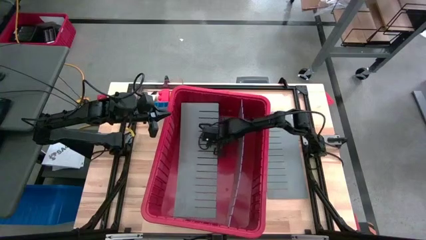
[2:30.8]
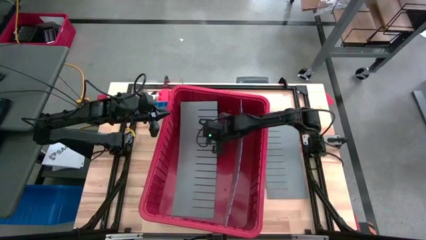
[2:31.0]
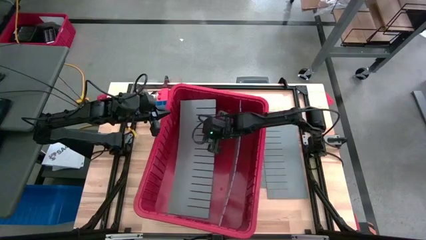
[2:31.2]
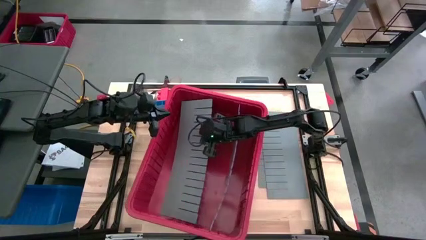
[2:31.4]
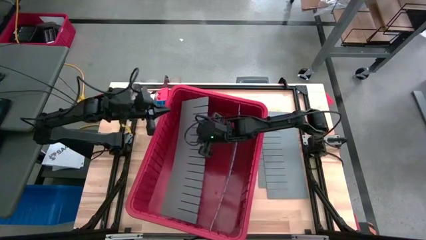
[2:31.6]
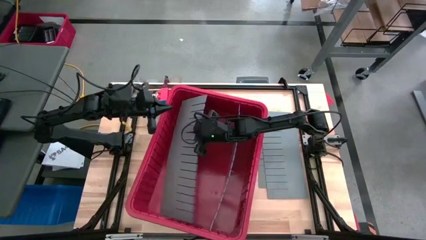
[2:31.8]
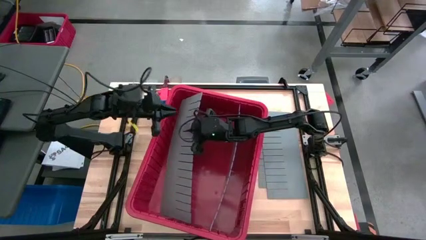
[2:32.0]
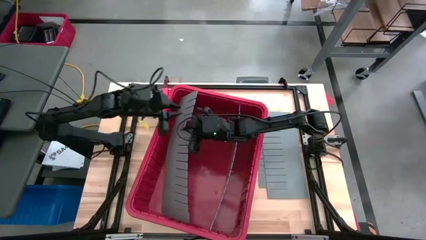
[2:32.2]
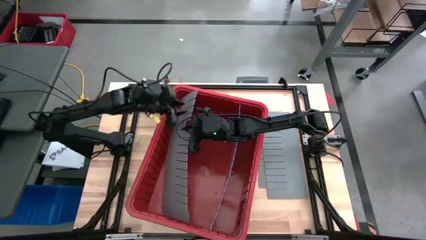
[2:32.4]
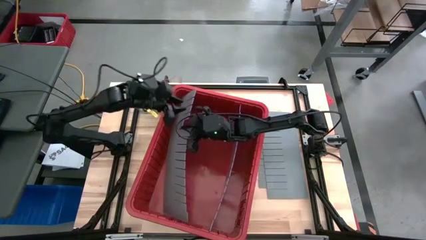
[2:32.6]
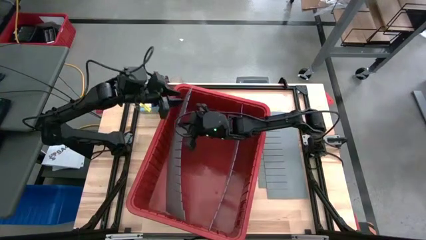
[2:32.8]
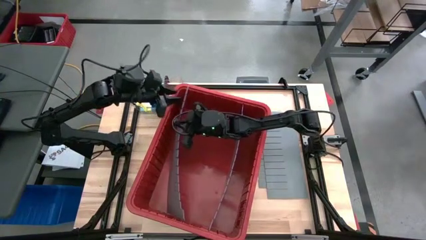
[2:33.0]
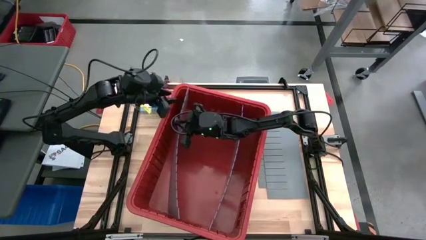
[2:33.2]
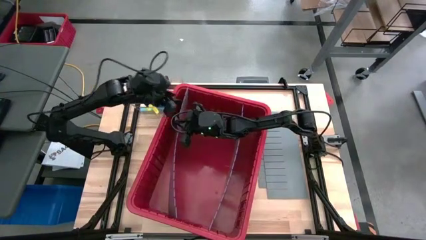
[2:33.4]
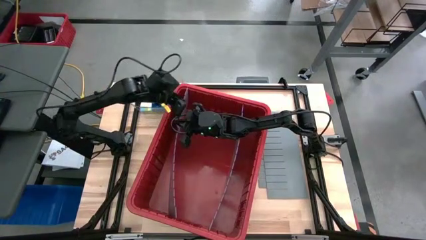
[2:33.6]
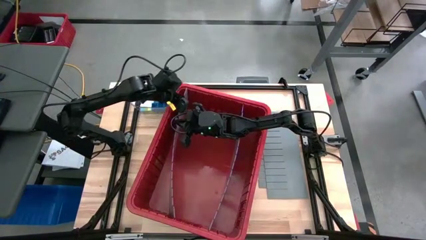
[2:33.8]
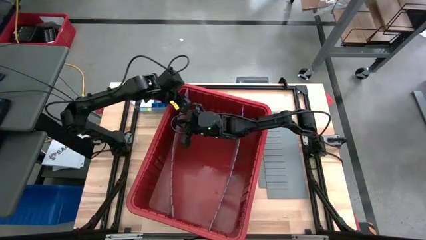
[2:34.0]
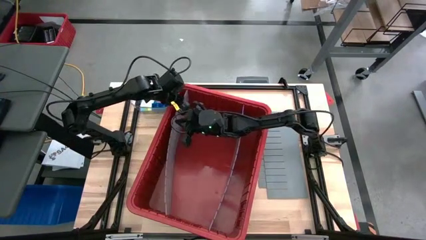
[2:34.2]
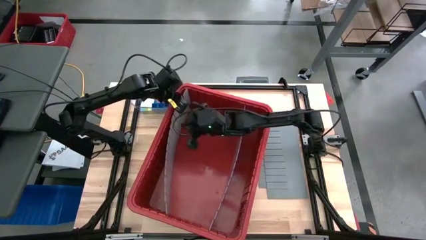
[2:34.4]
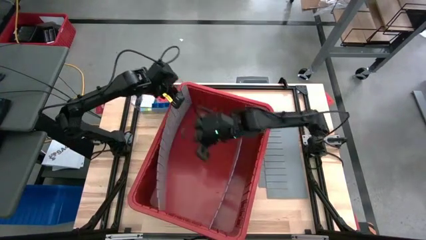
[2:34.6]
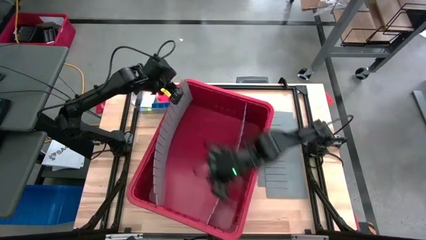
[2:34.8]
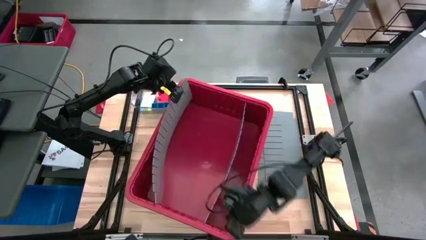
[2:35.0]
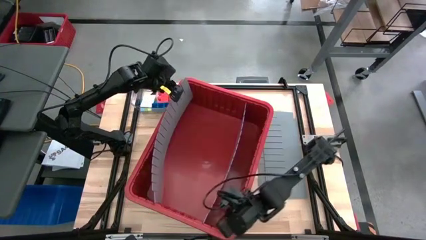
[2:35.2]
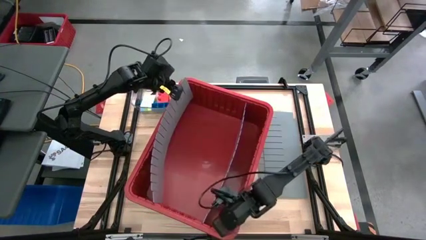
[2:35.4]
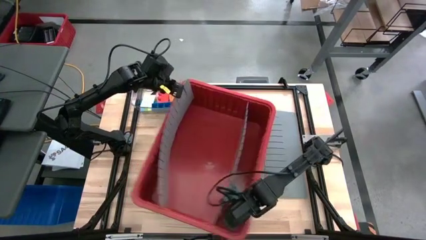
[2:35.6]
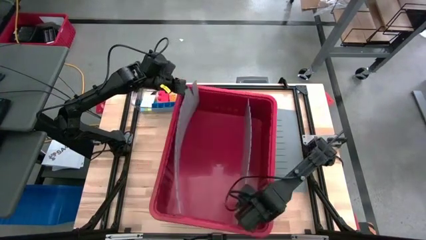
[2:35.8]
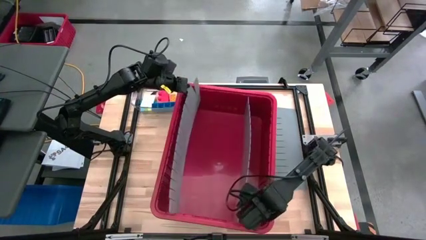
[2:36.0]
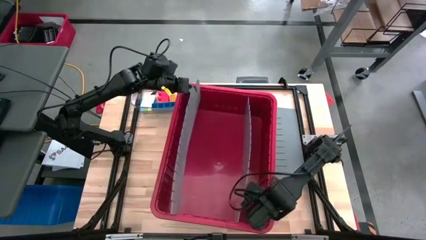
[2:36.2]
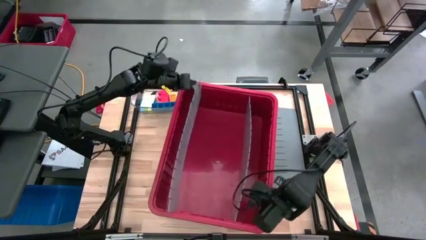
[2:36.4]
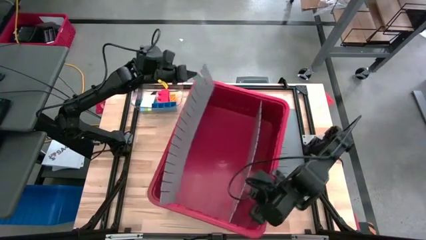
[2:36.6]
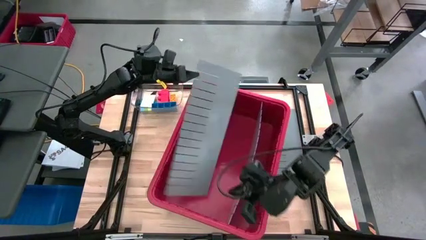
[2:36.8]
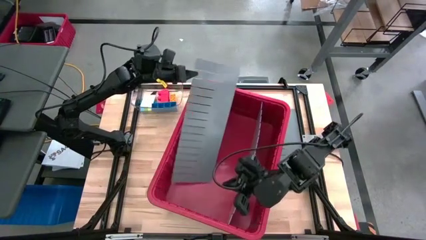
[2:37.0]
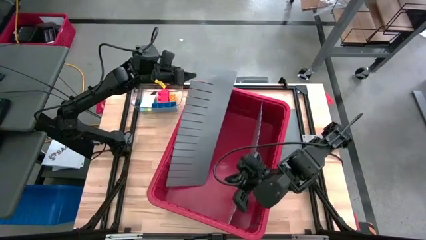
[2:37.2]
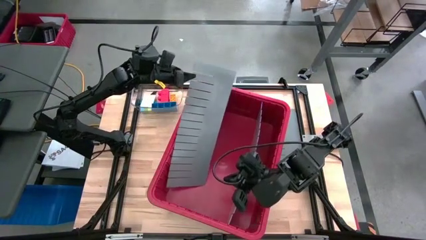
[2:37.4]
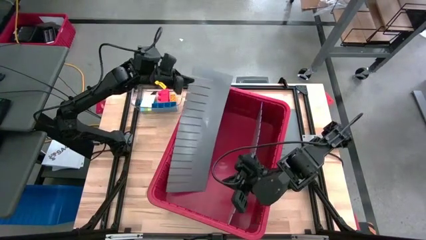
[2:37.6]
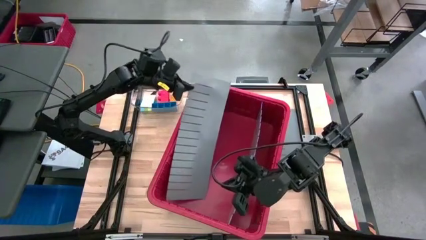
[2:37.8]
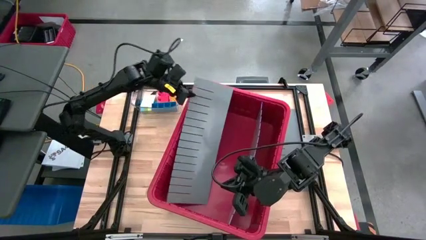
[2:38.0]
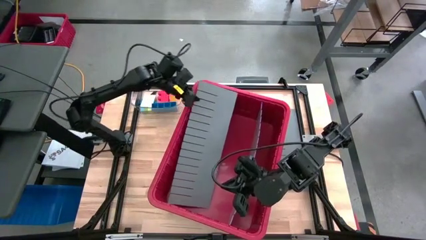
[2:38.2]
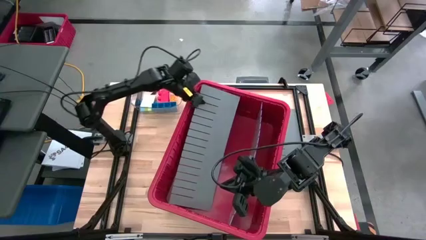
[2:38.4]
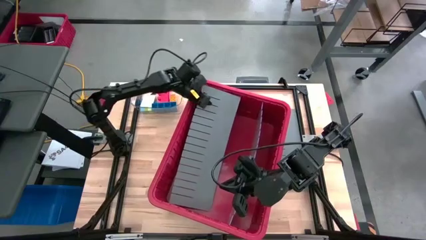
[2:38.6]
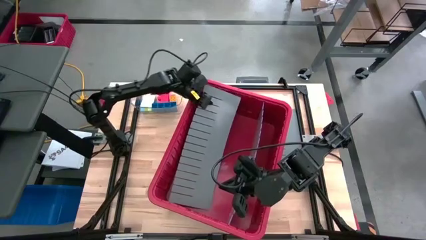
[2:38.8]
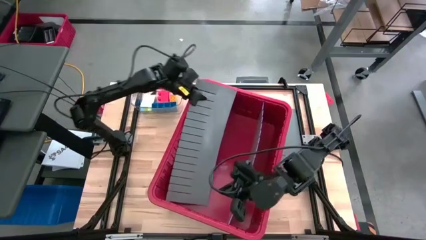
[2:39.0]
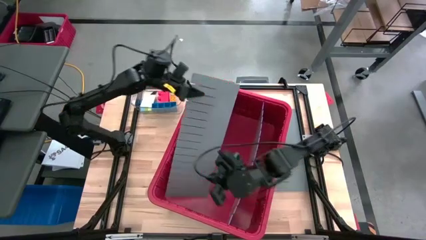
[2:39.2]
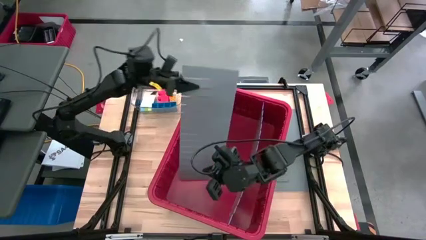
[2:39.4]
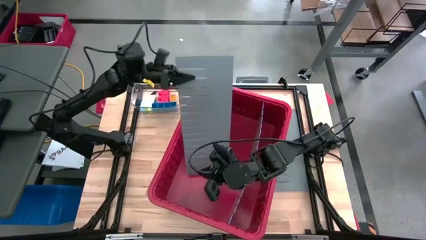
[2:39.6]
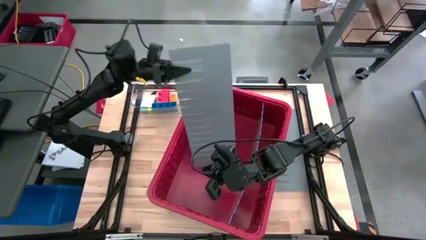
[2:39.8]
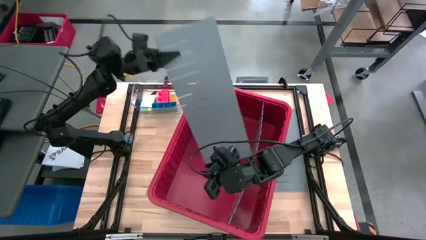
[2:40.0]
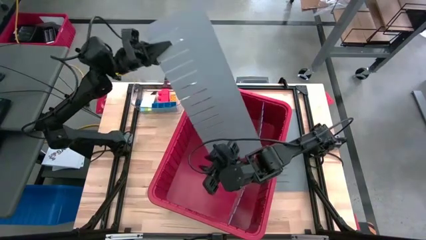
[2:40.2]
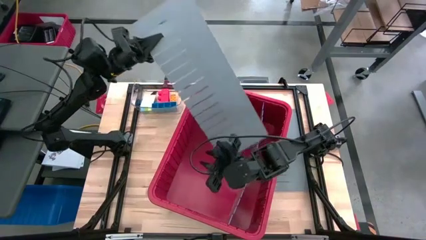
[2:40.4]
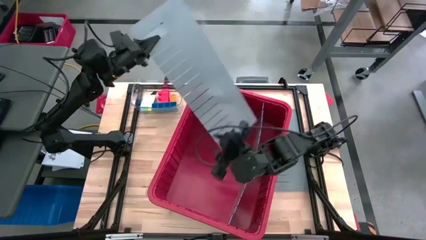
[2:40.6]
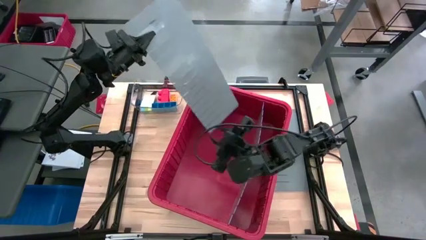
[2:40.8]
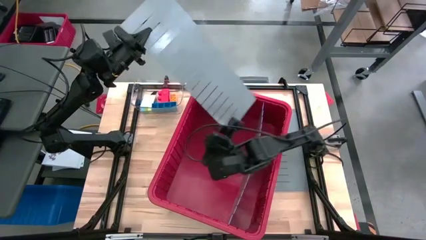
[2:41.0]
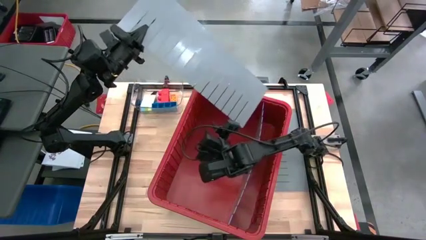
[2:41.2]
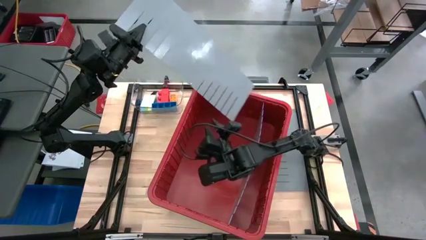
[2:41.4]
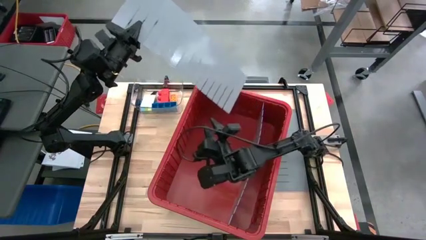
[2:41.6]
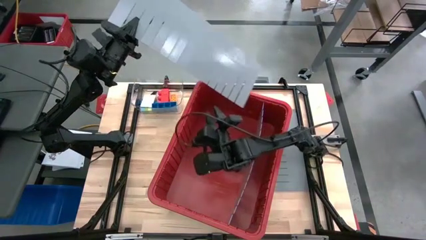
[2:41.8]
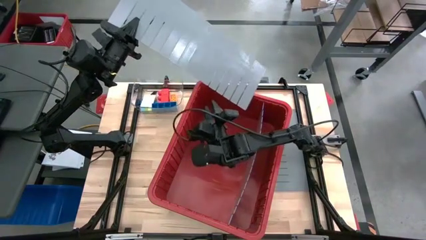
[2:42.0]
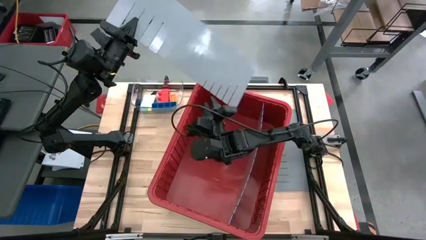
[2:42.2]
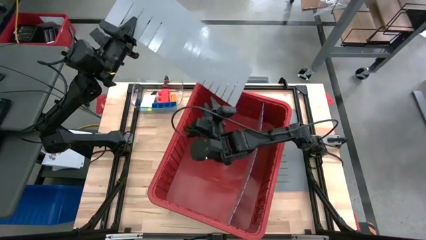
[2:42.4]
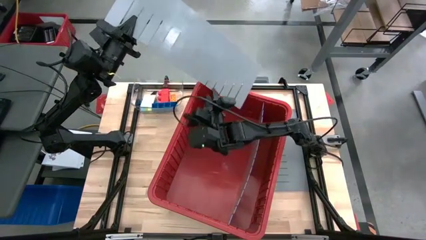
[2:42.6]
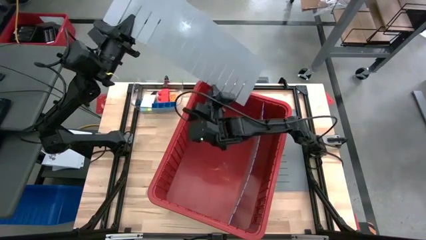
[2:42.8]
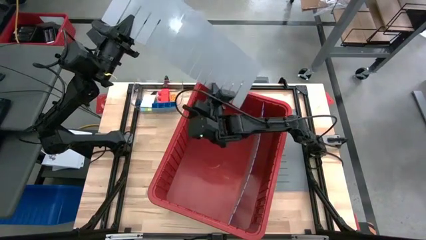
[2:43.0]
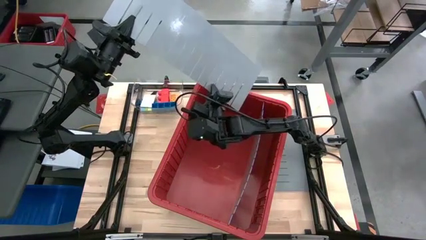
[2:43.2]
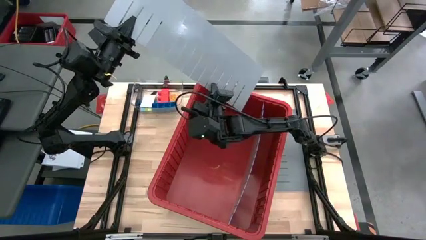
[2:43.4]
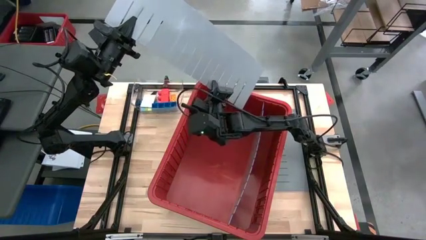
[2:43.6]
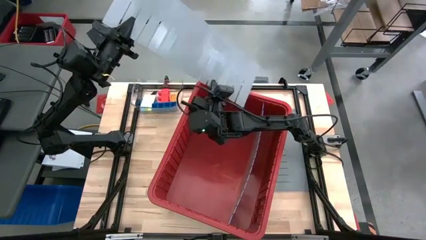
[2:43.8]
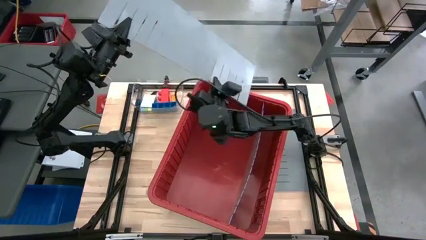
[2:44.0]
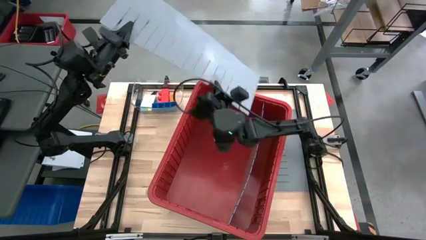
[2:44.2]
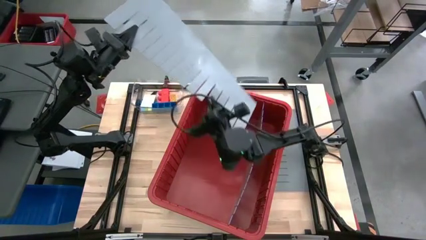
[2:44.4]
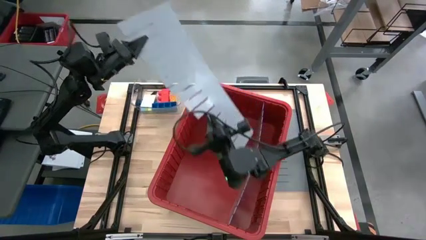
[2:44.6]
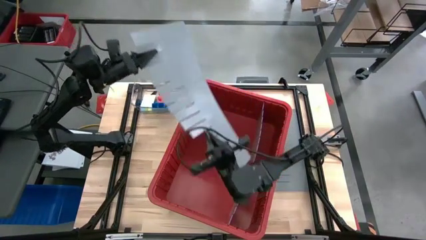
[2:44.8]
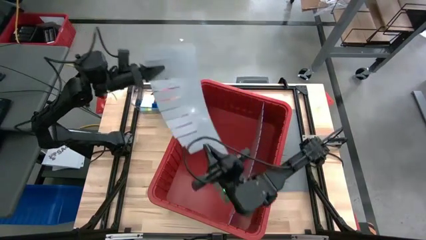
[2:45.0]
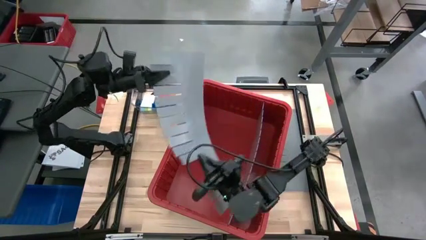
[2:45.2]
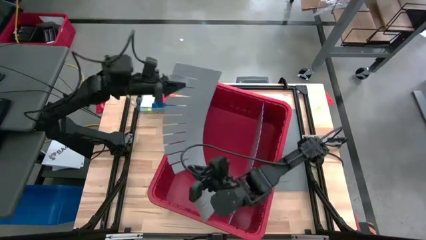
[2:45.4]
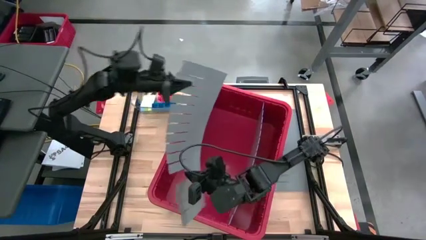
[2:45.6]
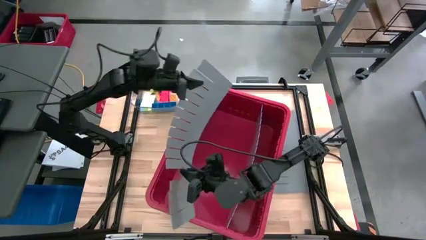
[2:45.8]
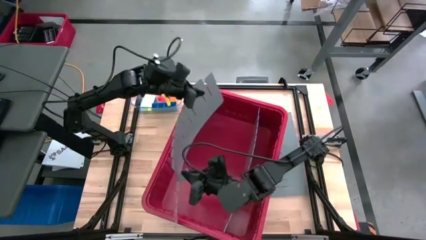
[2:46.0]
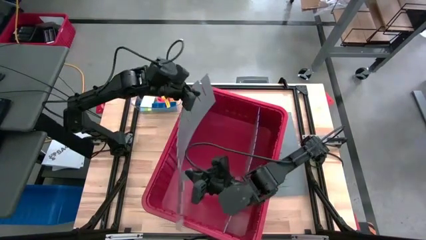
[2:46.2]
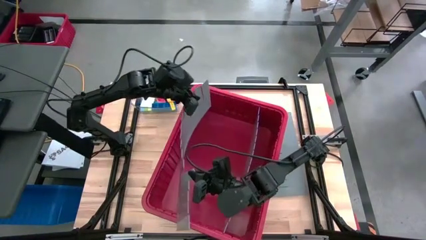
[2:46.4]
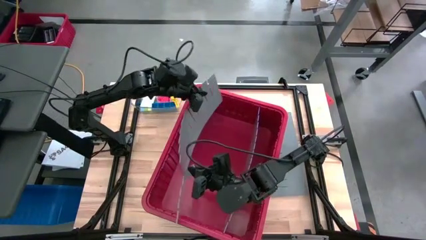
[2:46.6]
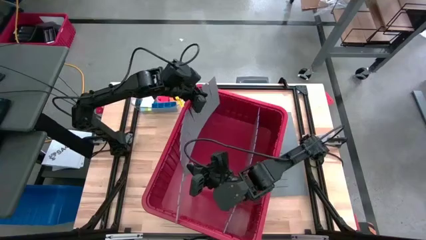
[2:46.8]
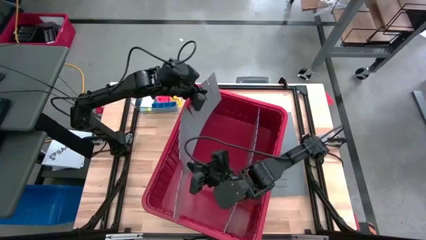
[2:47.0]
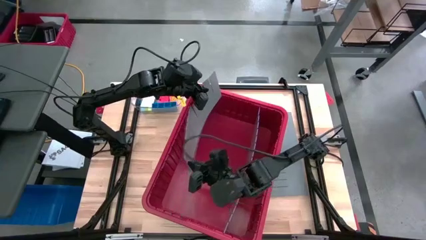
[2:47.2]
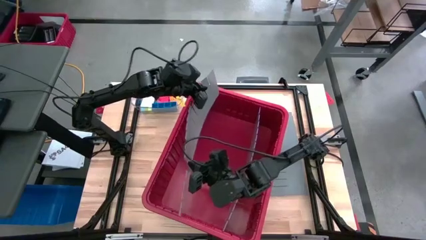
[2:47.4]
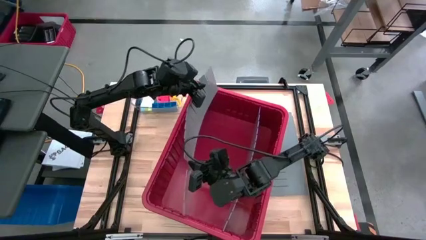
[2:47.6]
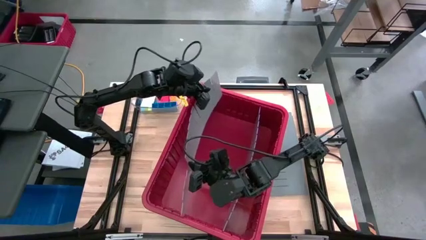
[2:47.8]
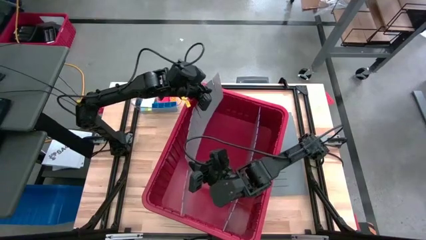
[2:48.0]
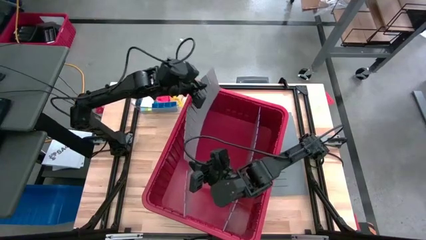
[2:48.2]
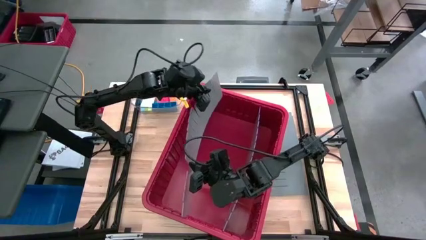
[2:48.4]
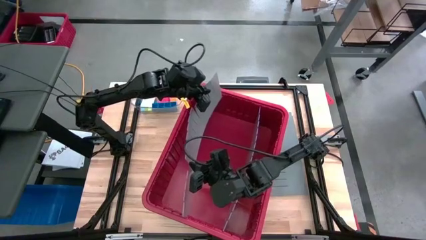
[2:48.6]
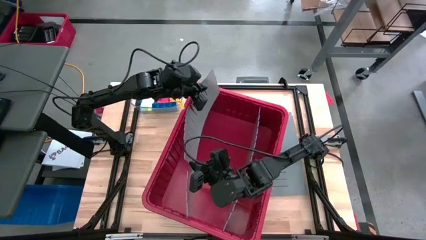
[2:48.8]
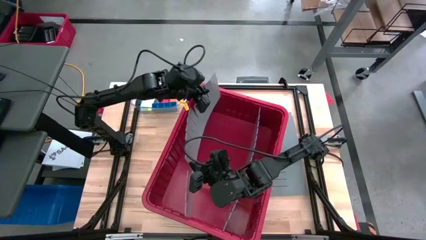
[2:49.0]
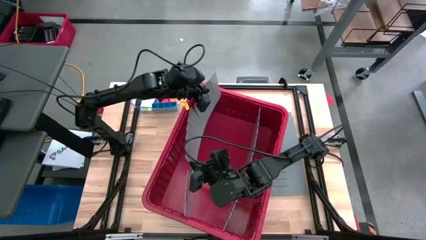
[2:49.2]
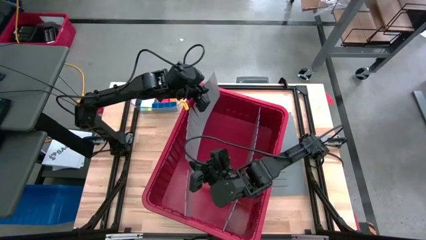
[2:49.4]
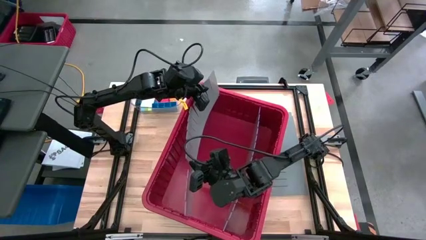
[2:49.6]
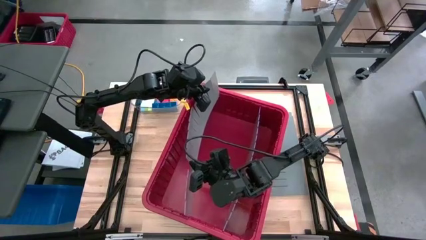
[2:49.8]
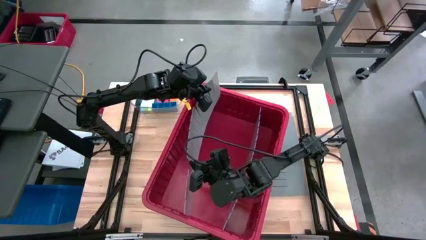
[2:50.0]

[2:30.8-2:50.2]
Task: Sort blocks
Assemble the bin divider into the red bin
